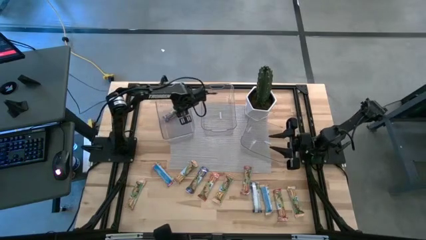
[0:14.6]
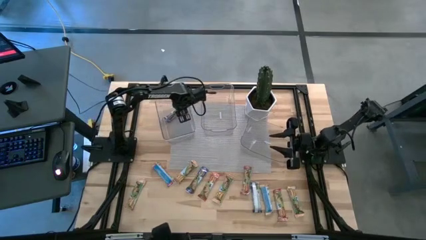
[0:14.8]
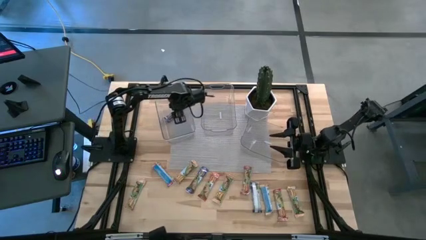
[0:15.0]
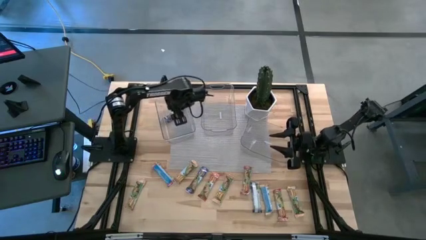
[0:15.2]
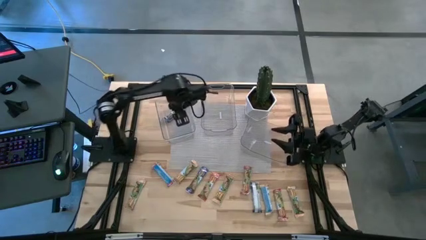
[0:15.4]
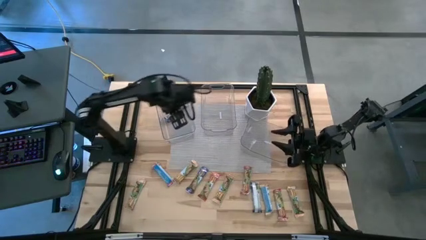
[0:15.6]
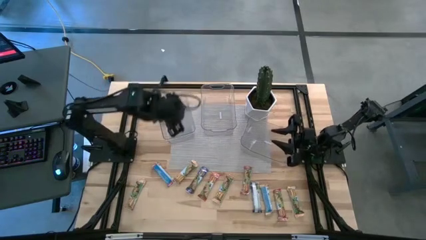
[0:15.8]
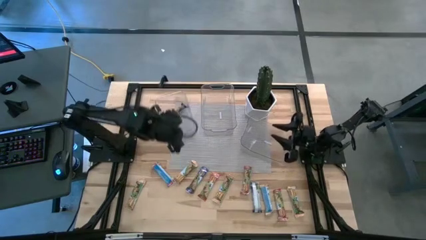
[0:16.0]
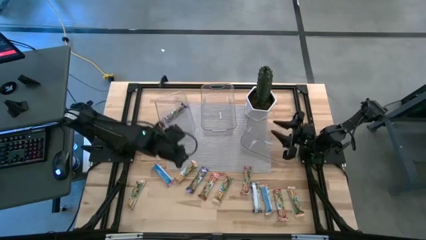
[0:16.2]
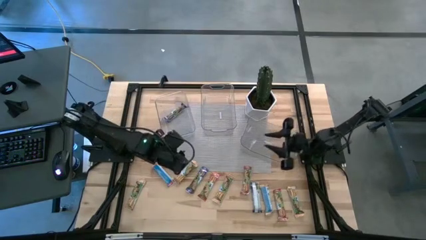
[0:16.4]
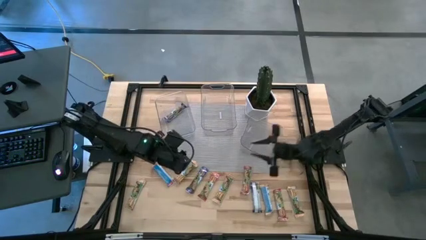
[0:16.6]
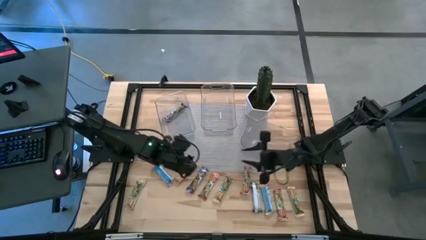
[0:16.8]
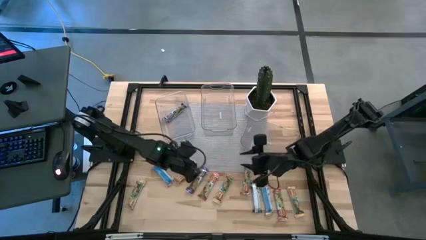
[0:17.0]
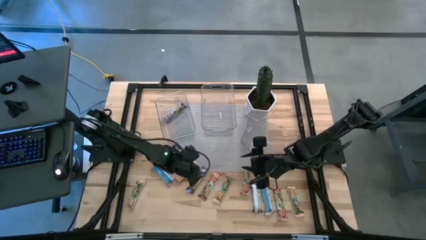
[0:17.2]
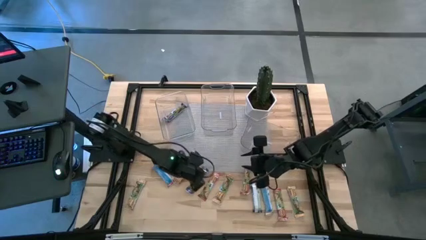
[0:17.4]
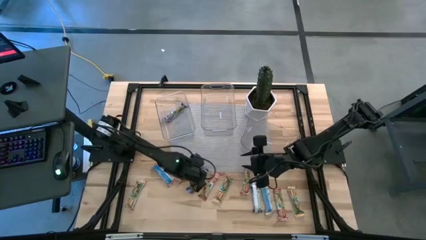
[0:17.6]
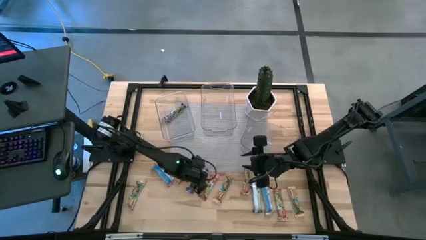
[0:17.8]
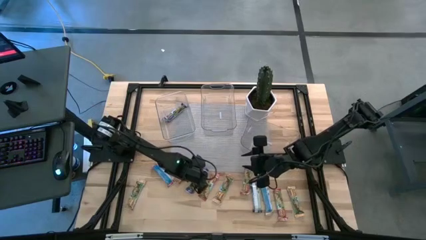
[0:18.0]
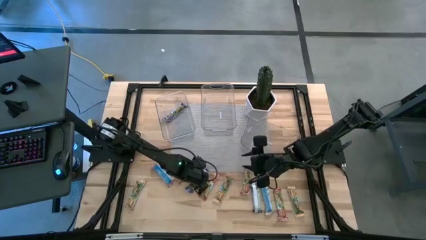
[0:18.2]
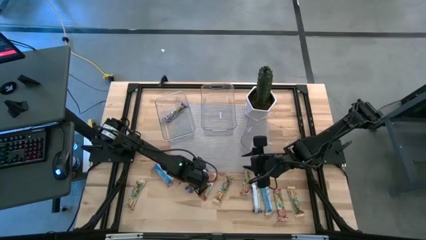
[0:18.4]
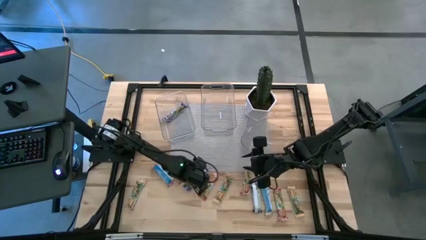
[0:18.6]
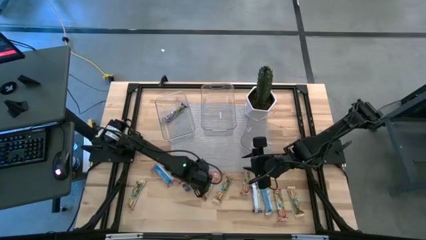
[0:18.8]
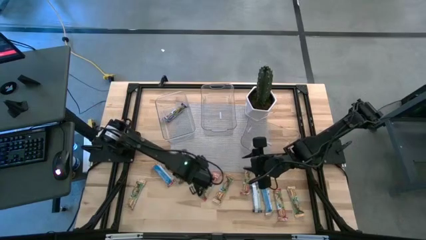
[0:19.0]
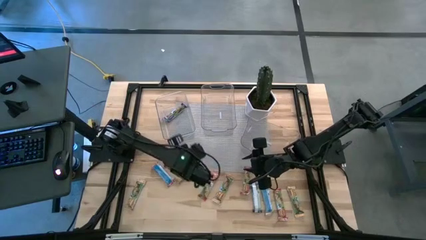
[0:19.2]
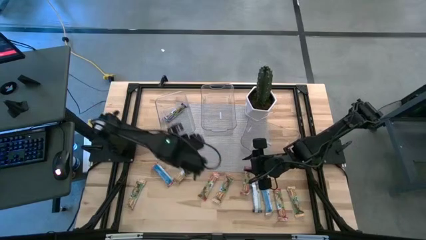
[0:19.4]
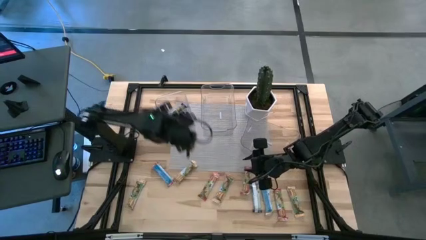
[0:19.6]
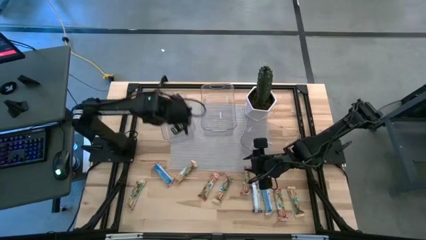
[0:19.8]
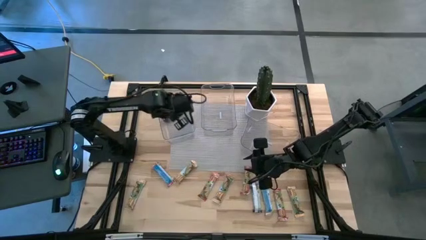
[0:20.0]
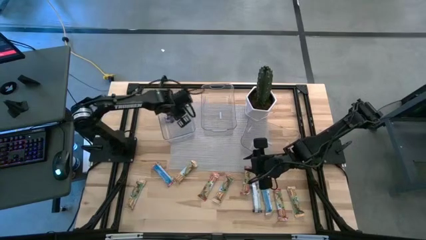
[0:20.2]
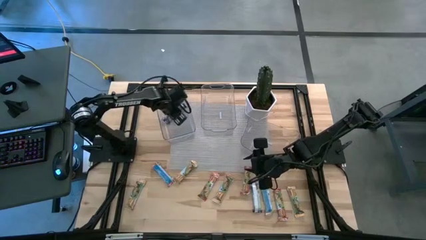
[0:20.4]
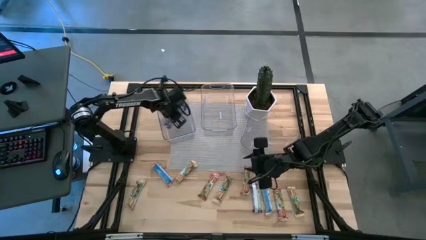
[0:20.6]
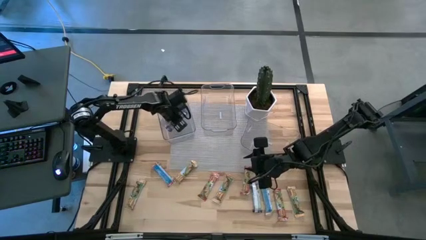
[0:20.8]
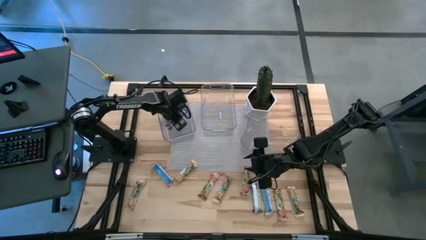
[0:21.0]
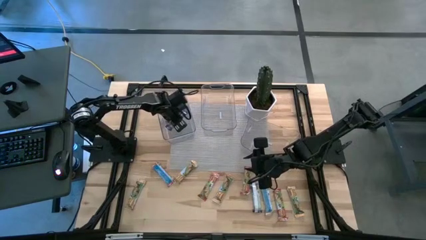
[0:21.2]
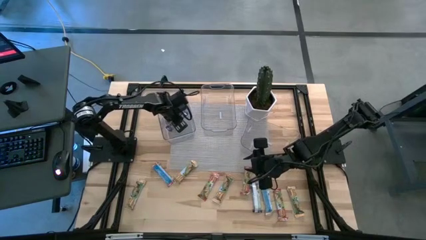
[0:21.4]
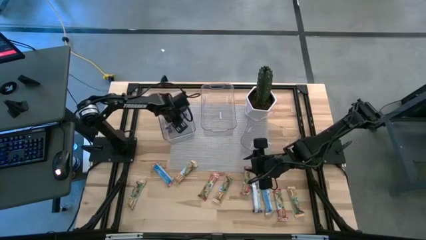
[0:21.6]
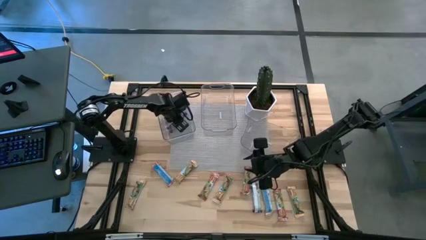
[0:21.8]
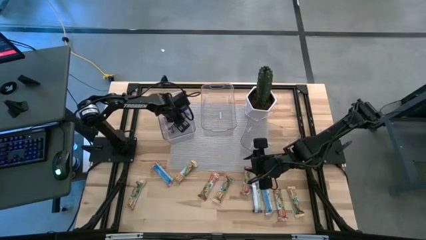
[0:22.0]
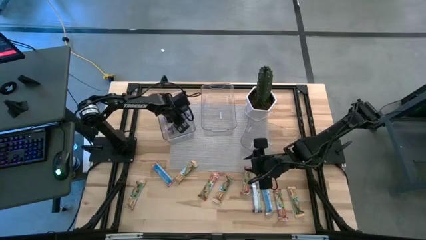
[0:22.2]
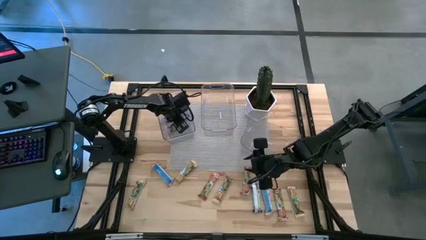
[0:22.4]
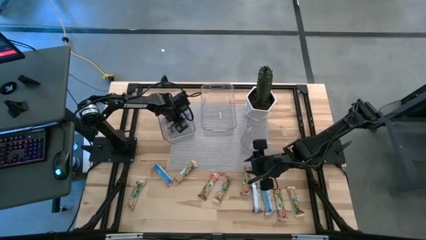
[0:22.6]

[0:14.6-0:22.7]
Task: Pick and place Granola Bars by type
Put the blue granola bar into the left bin

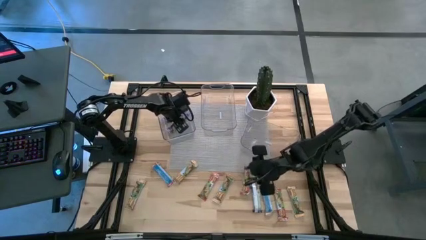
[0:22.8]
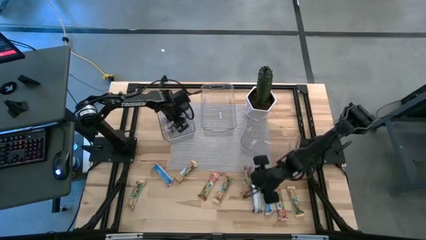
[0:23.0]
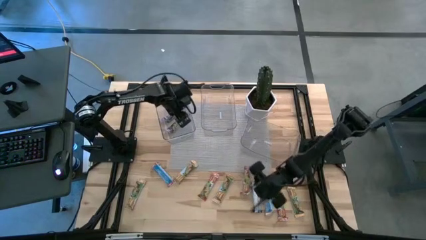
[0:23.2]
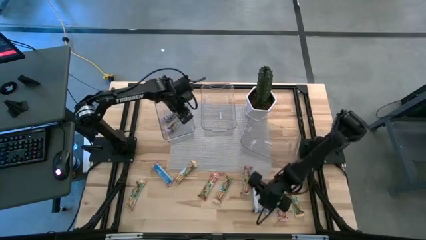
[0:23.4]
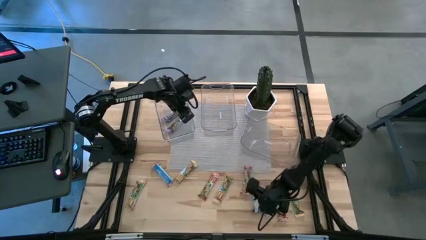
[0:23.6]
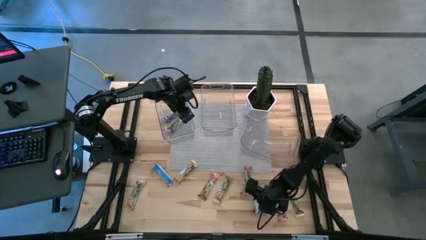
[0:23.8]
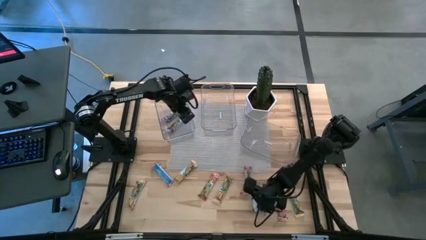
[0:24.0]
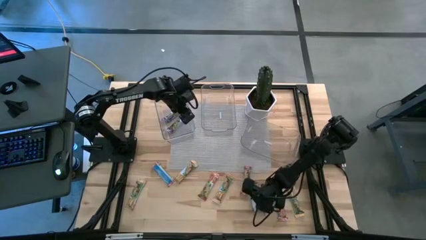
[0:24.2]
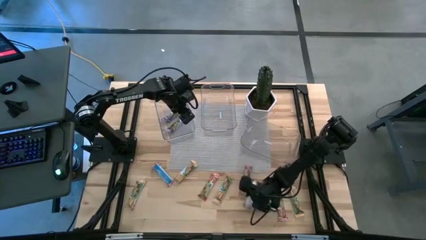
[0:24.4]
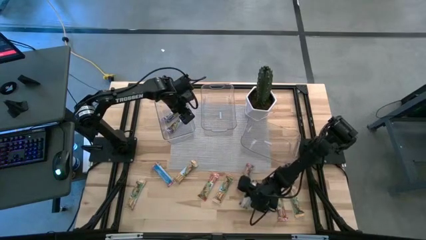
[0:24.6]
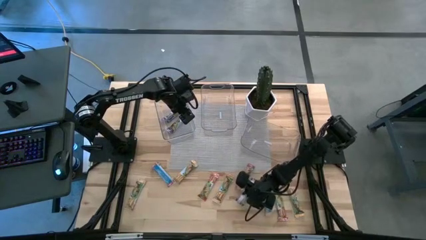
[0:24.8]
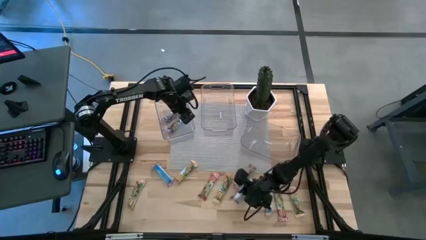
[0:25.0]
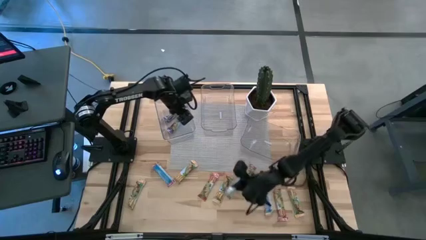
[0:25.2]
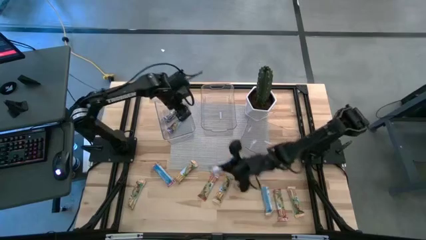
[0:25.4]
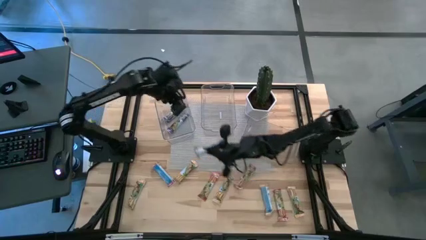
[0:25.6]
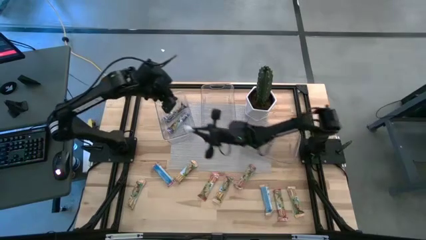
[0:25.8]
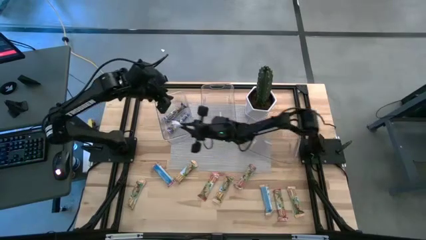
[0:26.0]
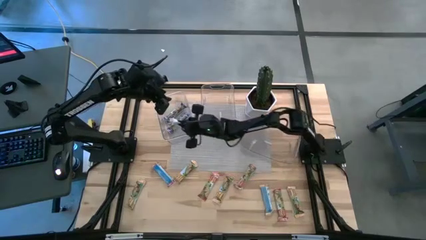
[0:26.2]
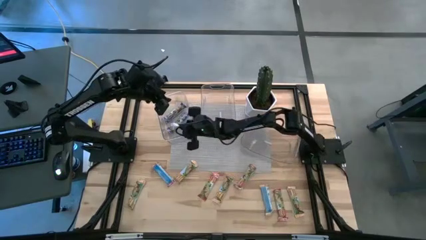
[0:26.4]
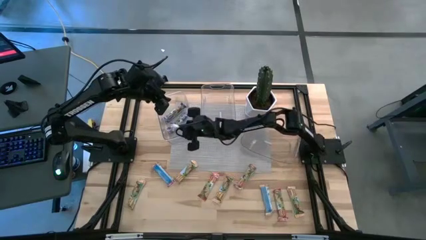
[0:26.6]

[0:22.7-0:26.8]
Put the blue granola bar into the left bin

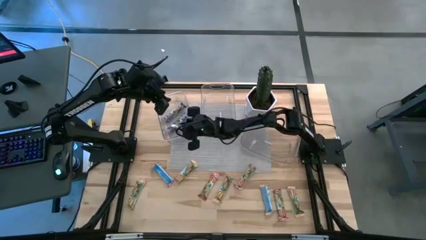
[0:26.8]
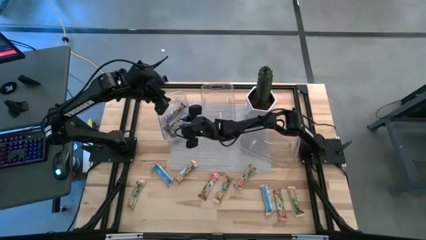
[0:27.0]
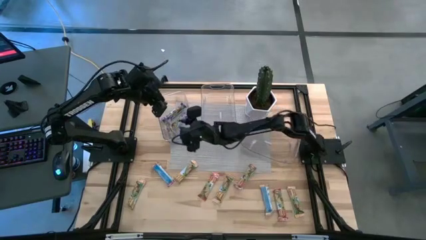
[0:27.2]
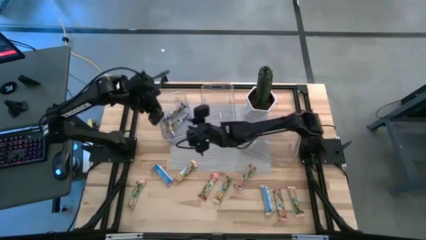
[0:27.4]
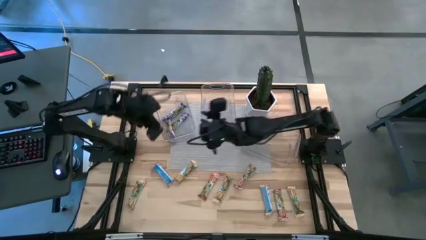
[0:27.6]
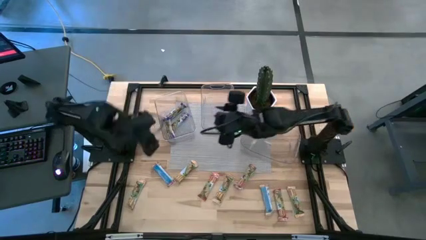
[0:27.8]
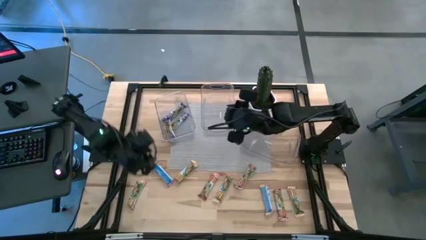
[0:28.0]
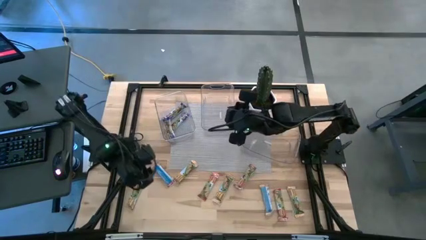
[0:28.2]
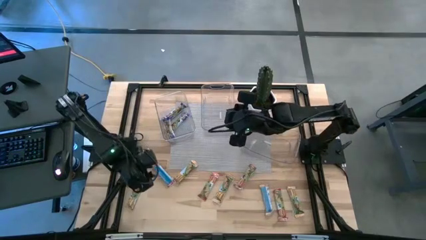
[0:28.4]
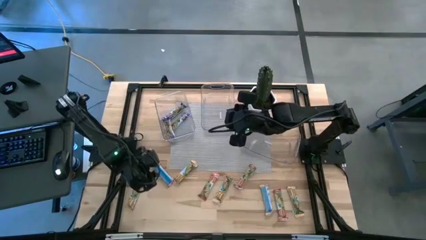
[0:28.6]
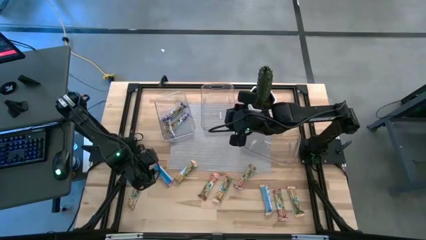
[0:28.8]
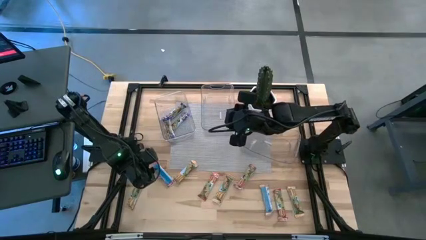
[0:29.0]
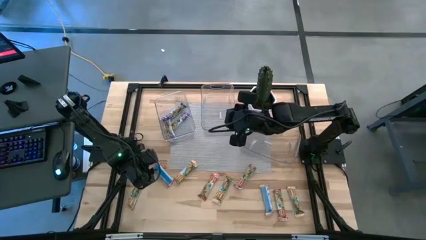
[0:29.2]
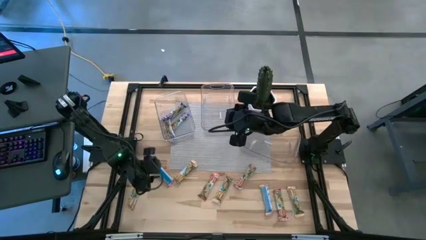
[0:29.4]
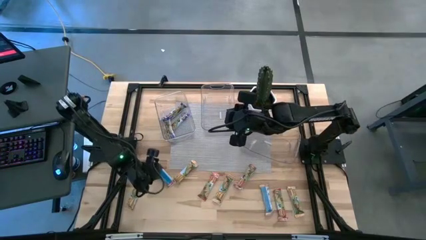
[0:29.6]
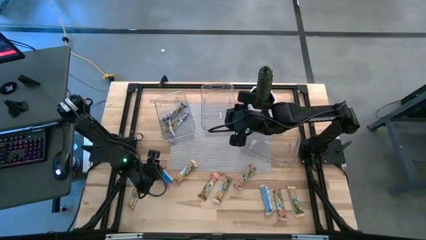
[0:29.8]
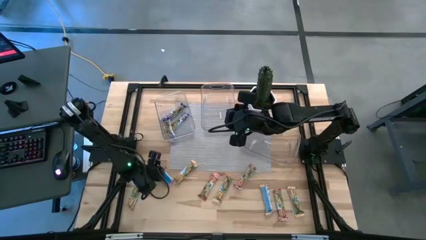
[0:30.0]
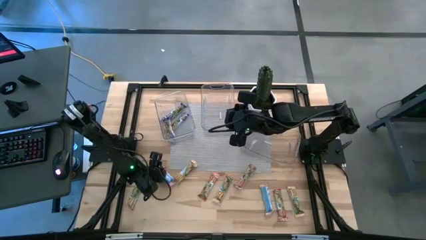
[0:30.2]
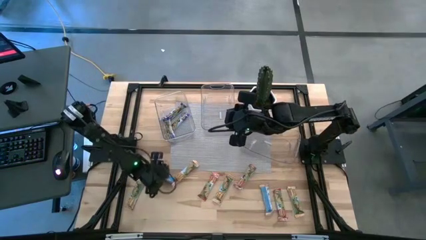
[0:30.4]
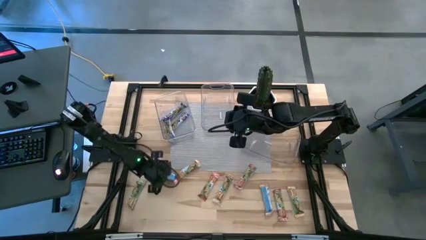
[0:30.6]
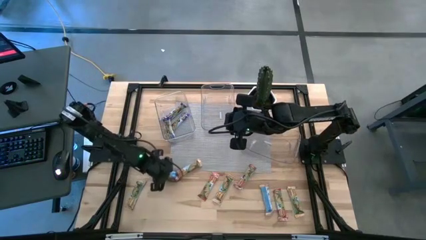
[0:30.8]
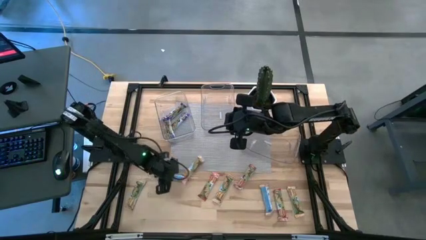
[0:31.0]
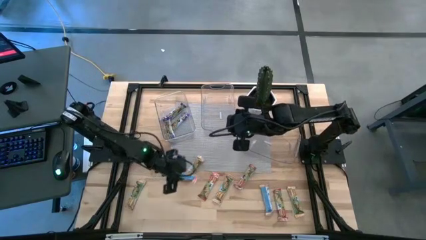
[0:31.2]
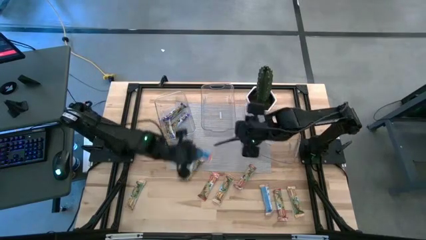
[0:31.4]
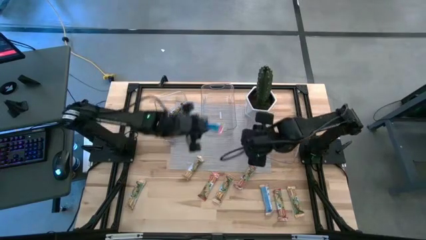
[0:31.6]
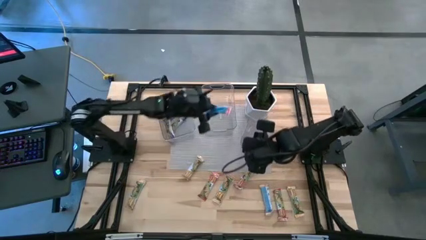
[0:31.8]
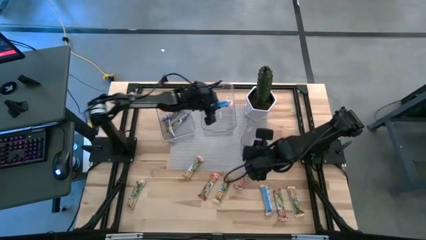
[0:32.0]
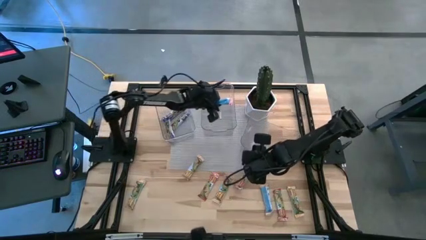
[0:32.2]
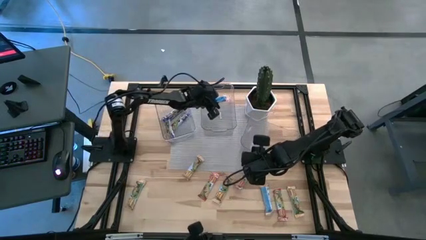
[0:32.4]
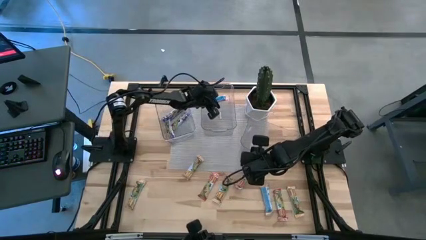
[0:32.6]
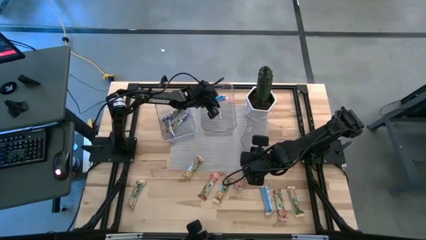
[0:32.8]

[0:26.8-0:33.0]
Put the red granola bar into the middle bin
